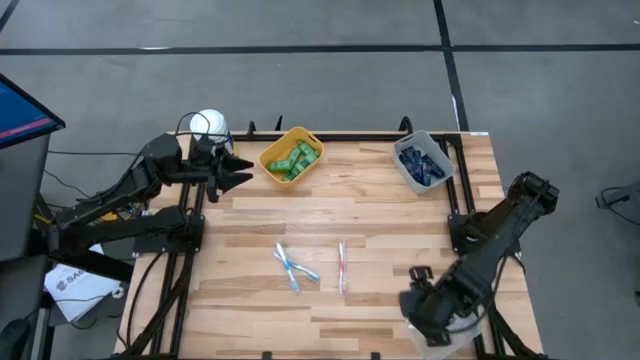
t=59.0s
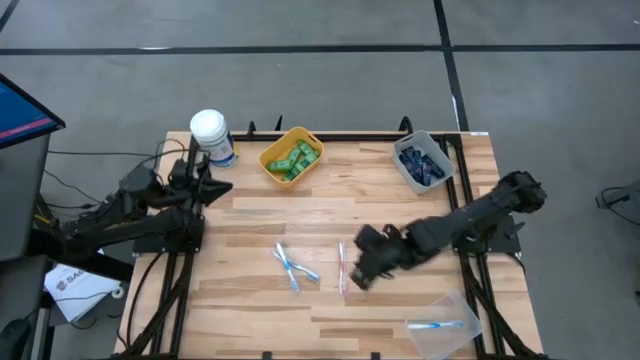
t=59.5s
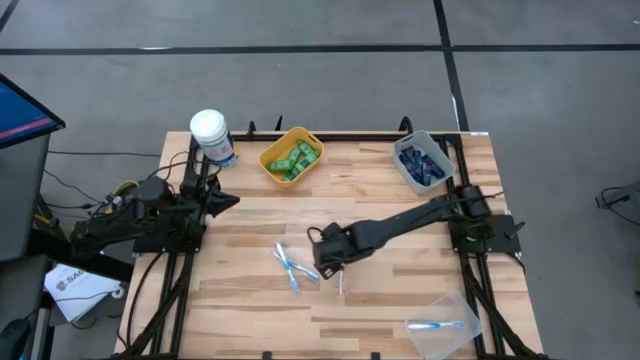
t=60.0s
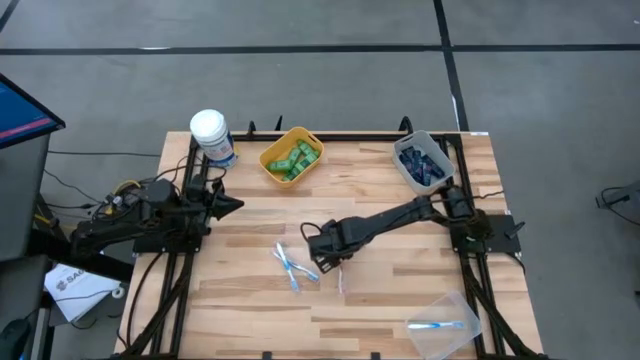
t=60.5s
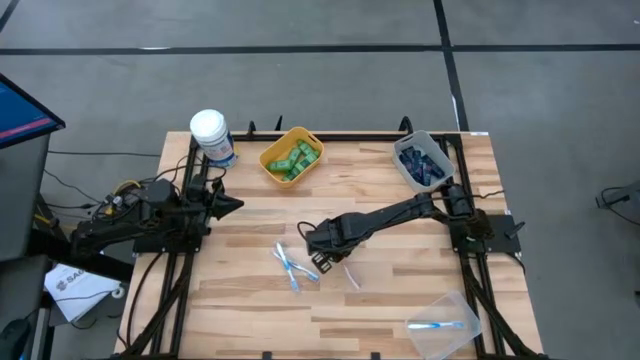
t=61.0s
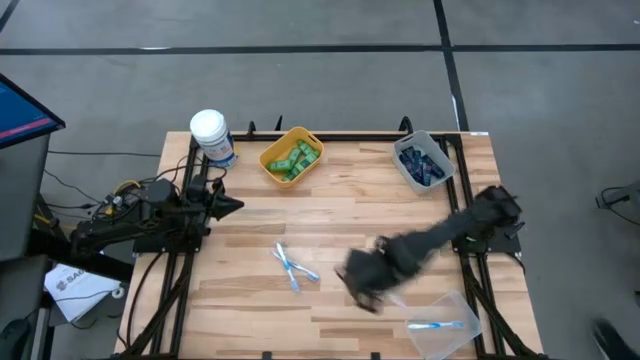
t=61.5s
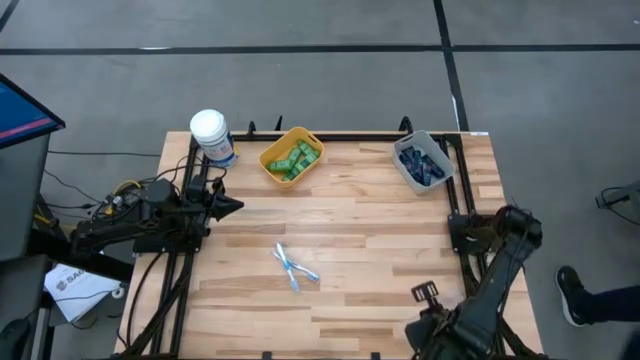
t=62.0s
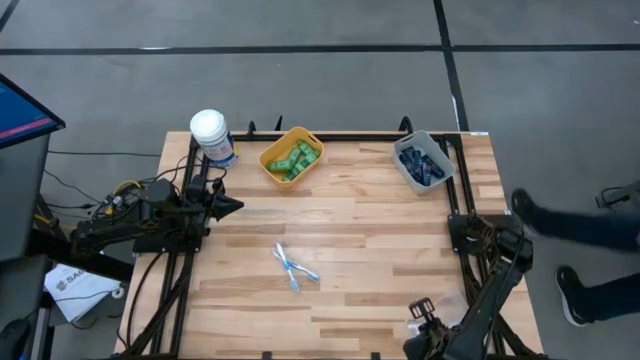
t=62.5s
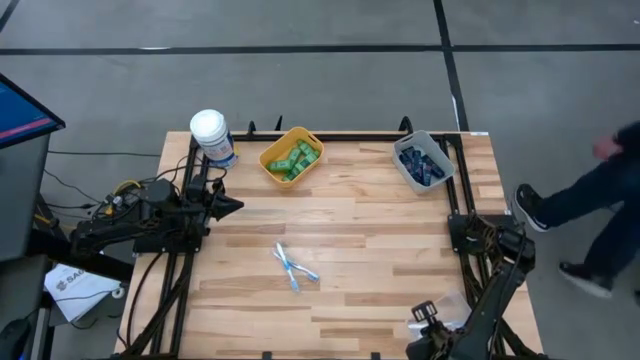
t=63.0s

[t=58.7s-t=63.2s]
Task: Pick & Place Travel size toiletries
Put the orange toothbrush into the white bin

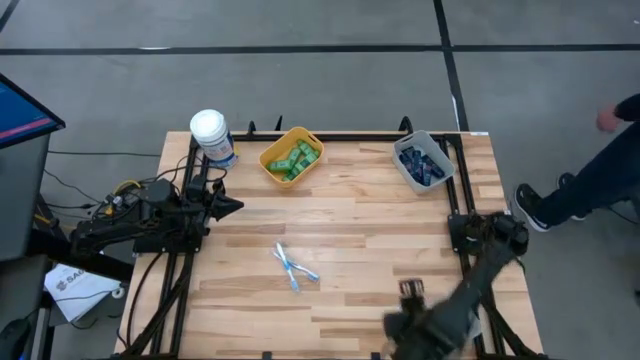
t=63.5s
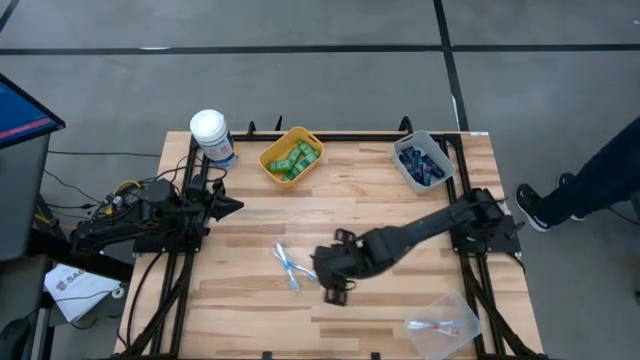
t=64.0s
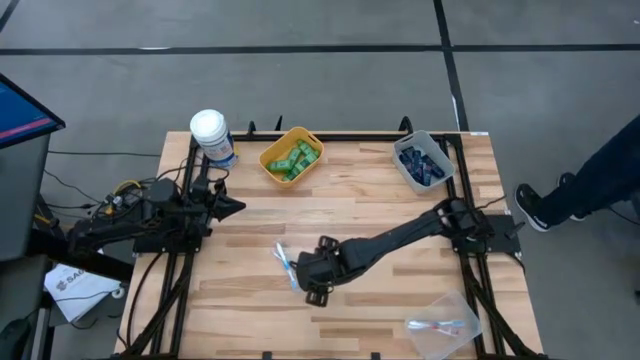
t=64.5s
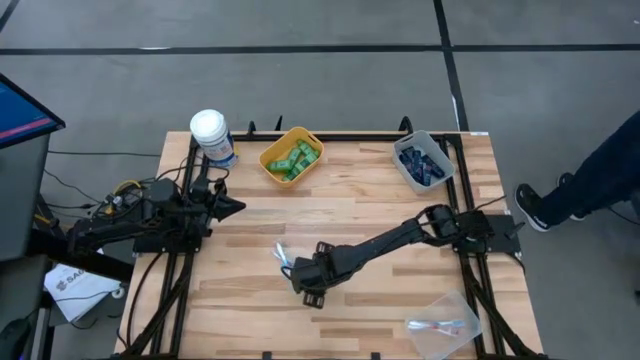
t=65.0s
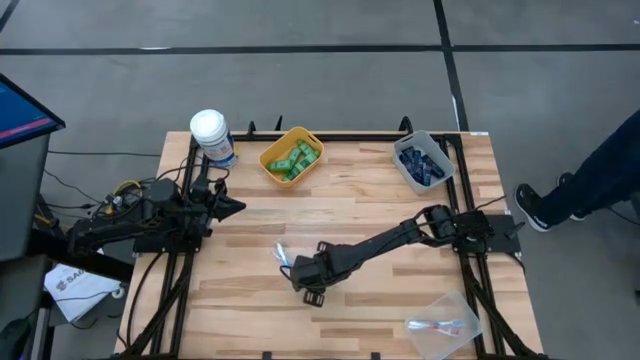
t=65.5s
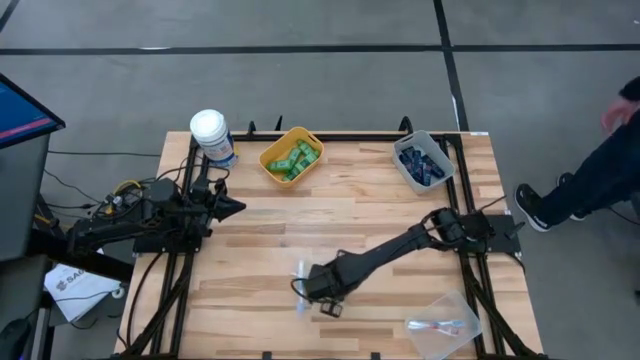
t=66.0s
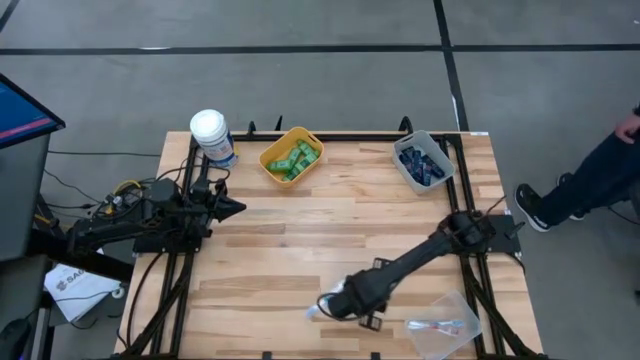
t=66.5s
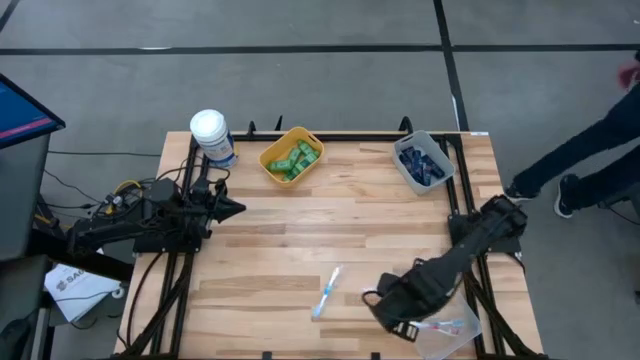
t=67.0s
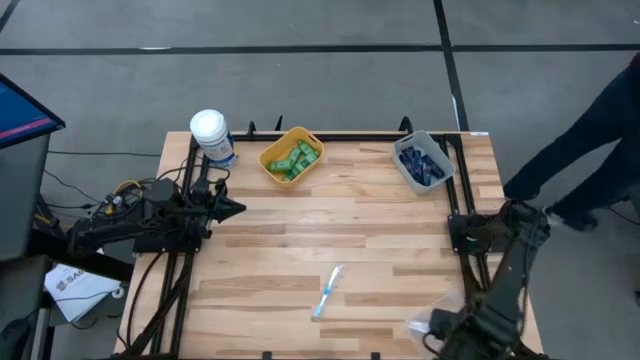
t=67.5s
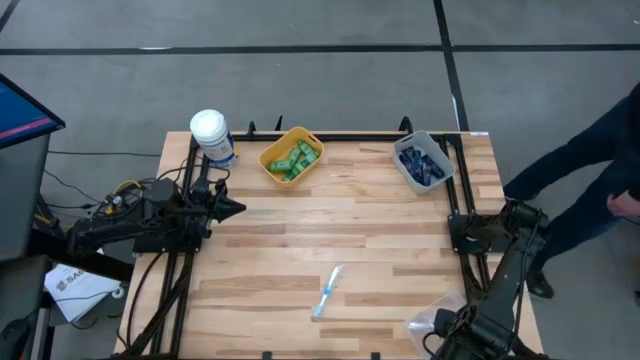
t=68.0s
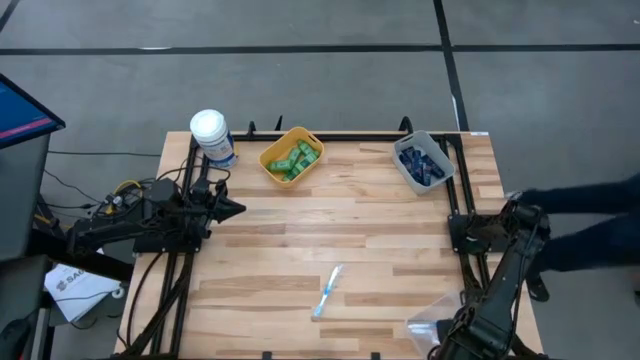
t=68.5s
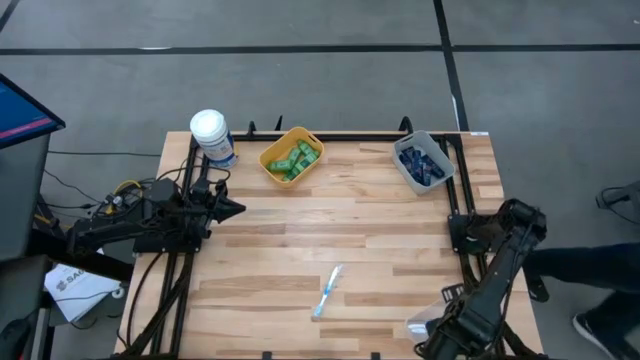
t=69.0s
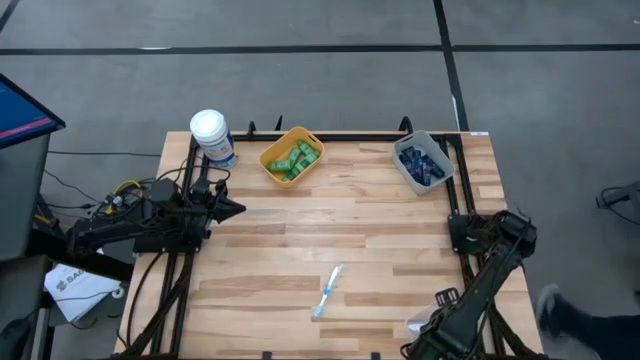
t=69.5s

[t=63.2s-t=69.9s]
Put the blue toothbrush into the white bin

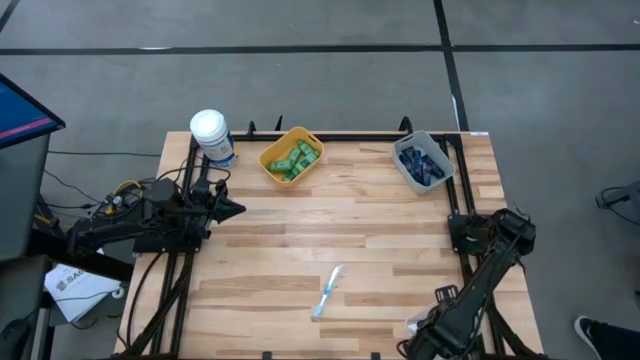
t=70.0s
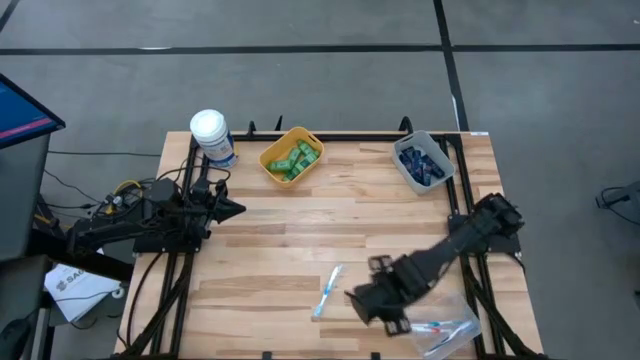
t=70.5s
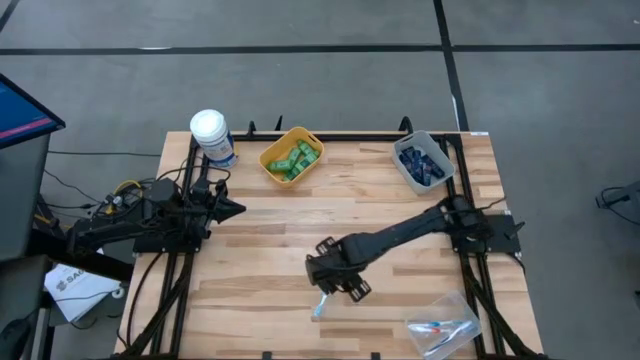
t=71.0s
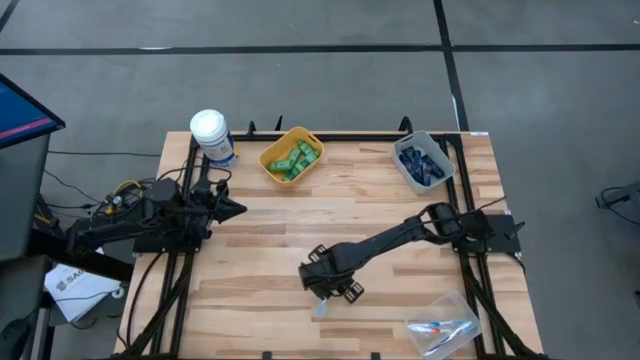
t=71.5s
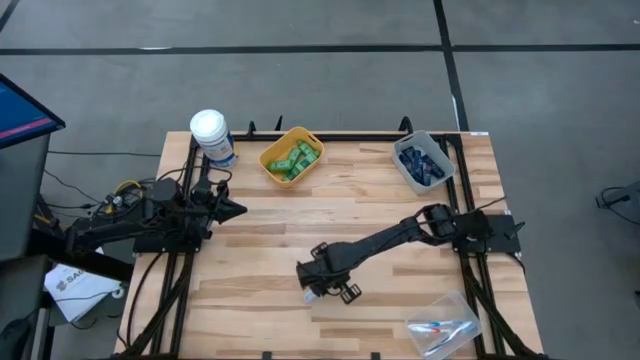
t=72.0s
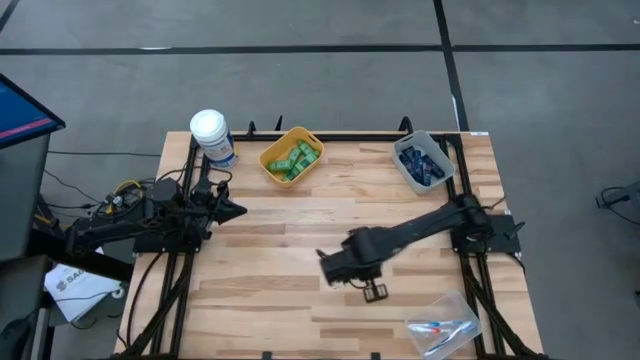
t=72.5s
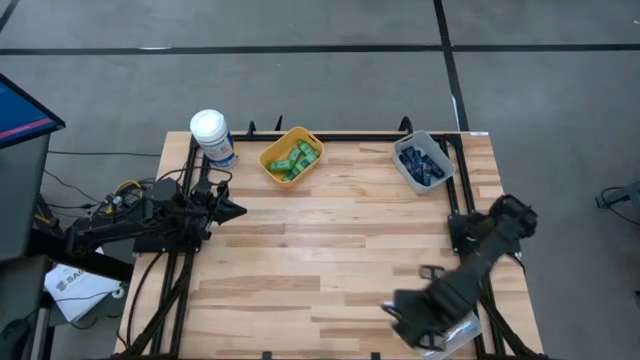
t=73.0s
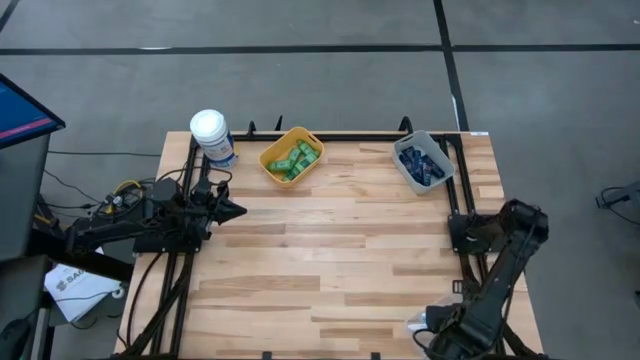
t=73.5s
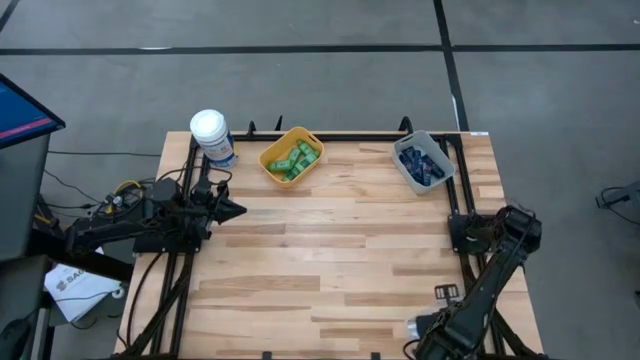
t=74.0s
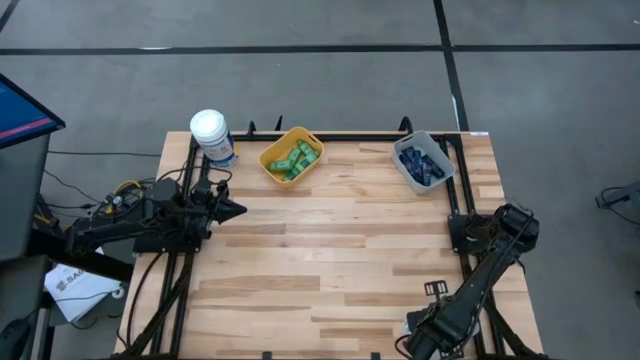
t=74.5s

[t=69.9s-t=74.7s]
Put the blue toothbrush into the white bin

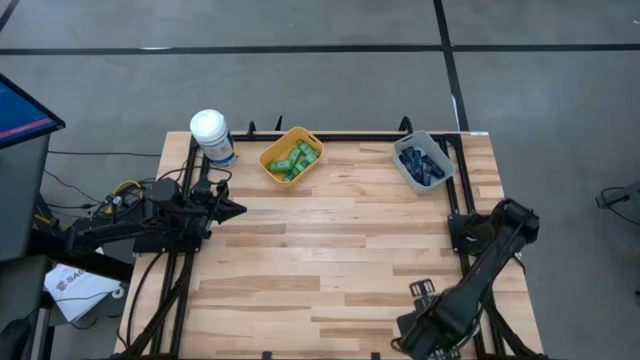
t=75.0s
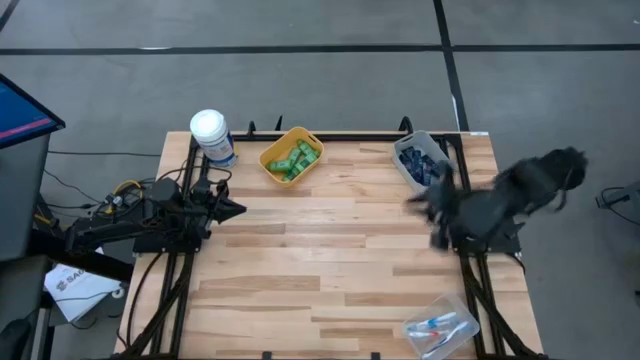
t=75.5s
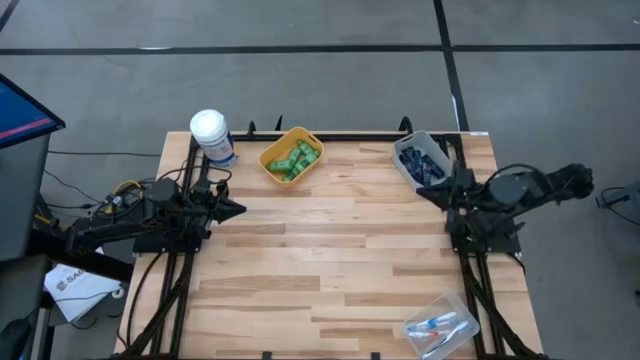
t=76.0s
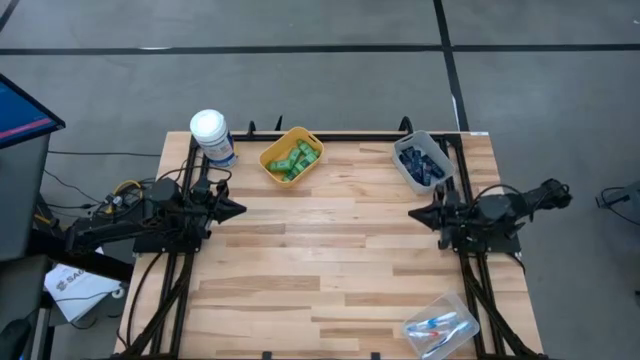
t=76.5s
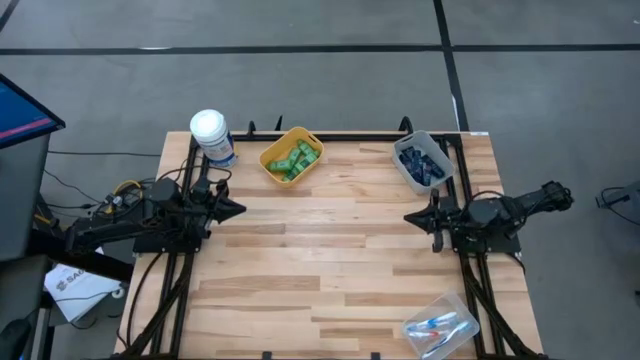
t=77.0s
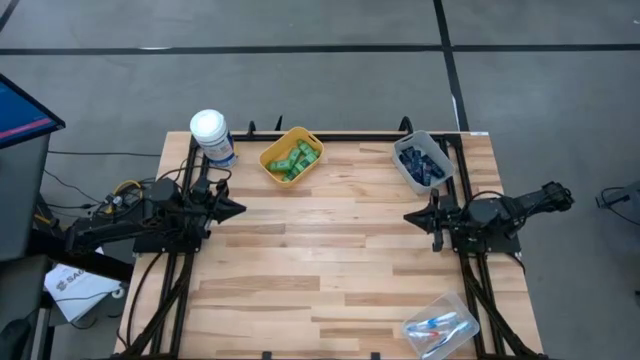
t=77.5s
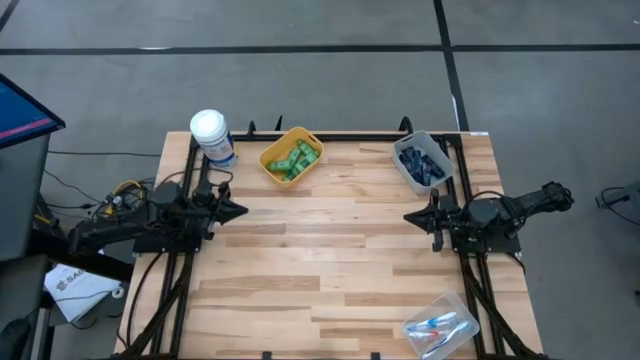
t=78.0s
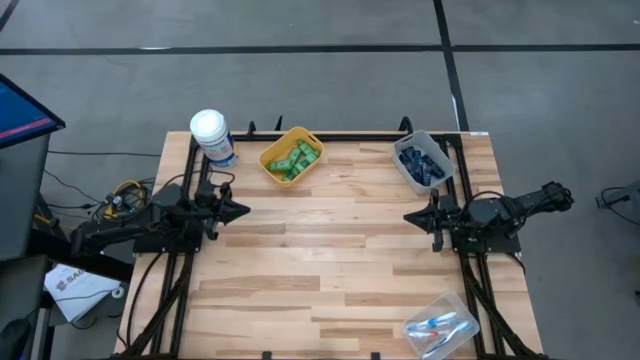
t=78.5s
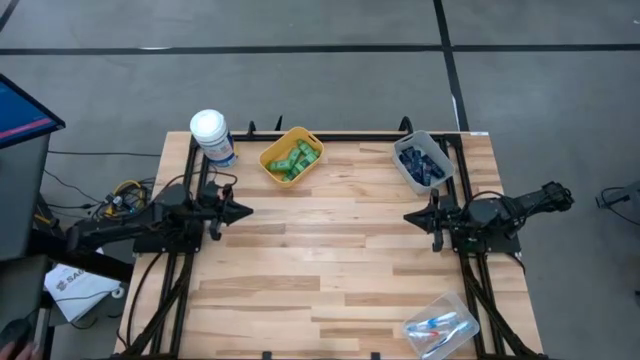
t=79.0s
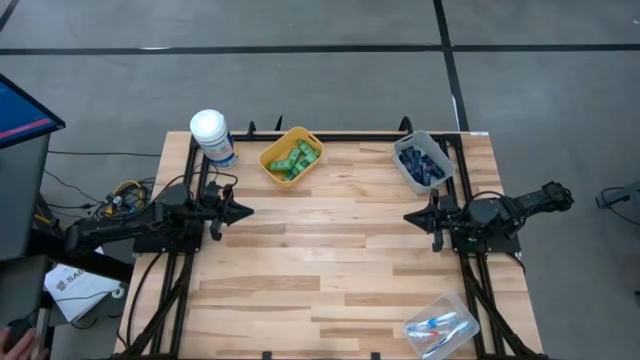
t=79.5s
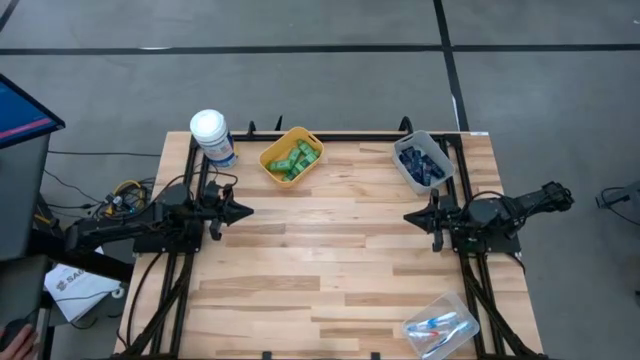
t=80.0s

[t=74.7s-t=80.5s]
Return to Home Position

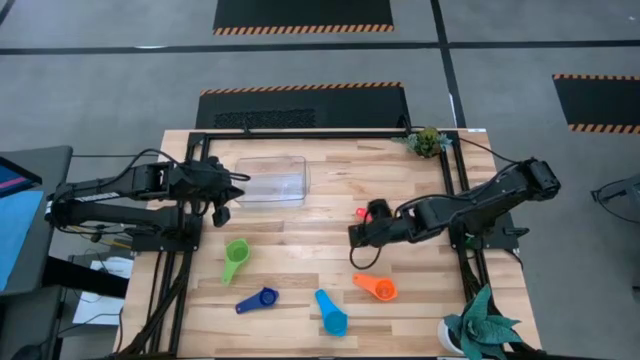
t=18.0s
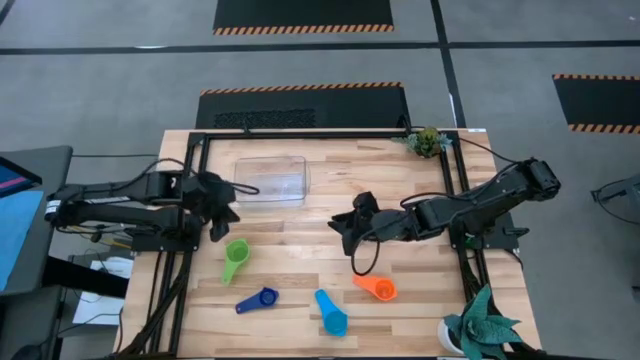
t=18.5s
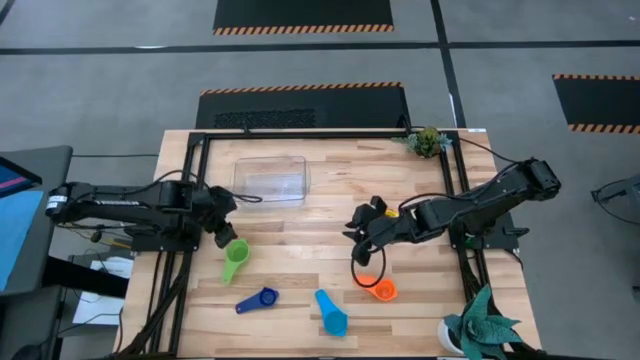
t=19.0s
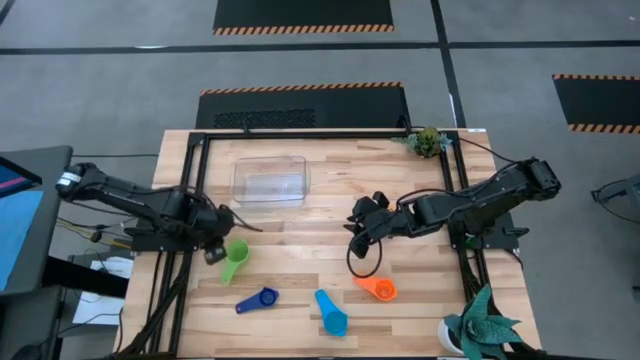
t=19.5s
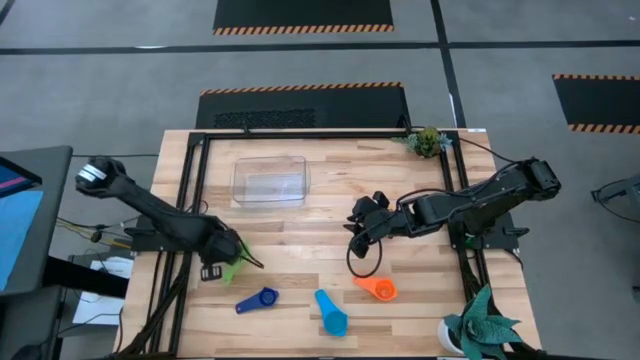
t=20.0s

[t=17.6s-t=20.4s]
Task: Nest measuring cups in basket
Move the green measuring cup to the center of the table
